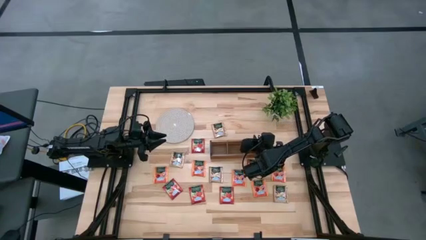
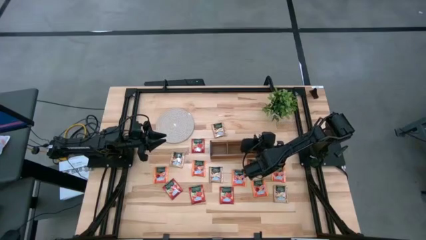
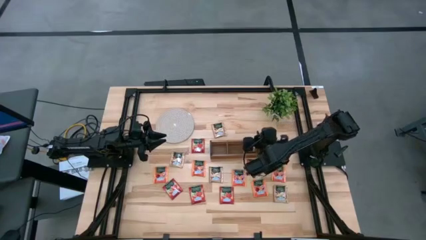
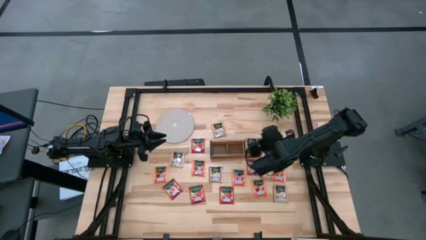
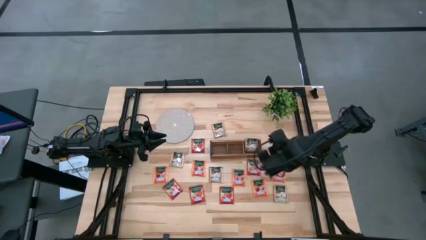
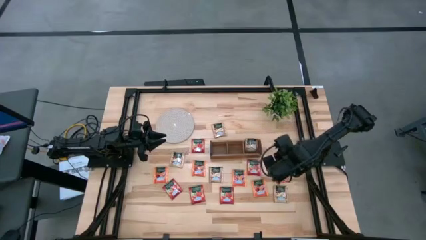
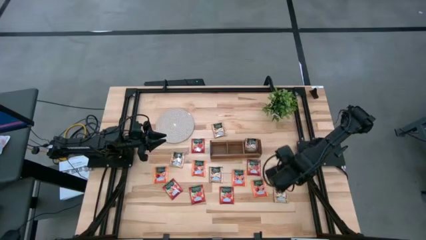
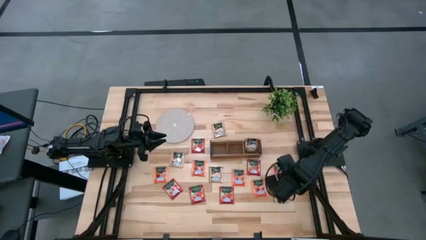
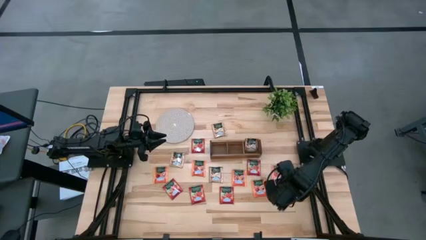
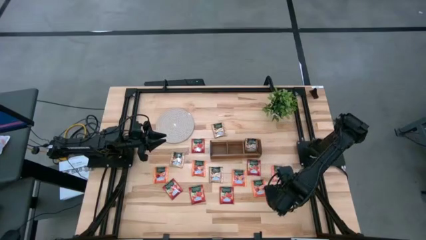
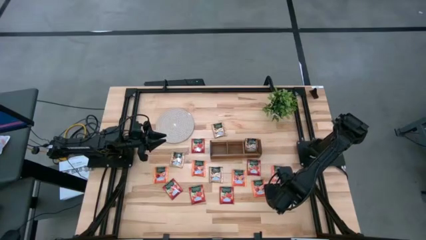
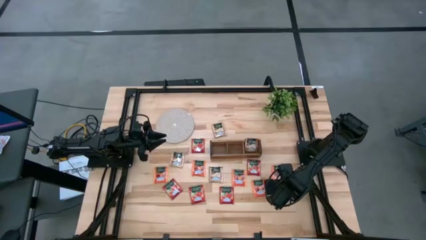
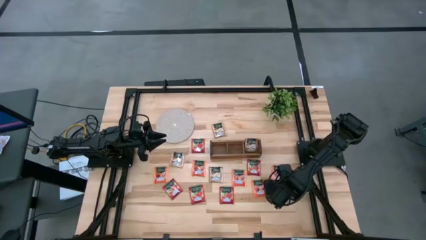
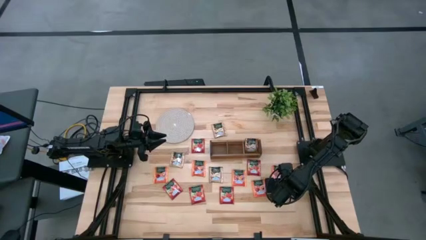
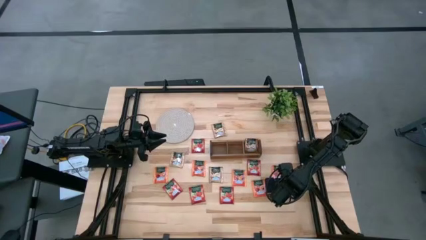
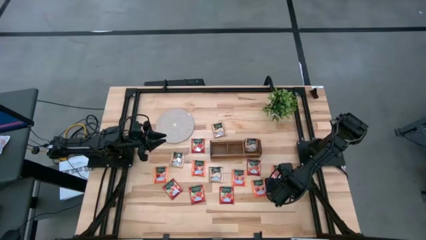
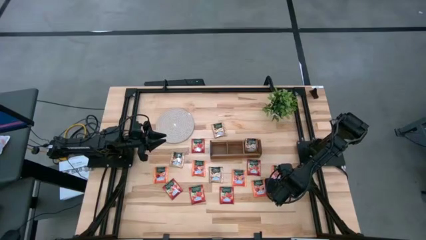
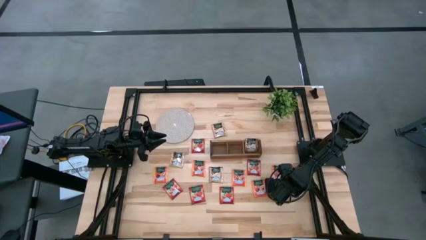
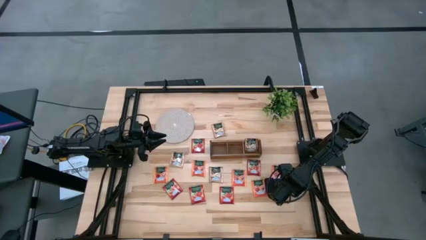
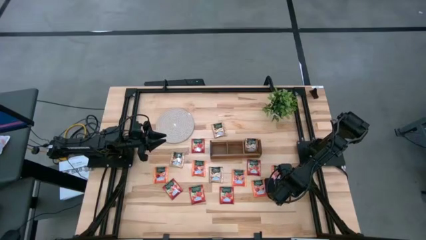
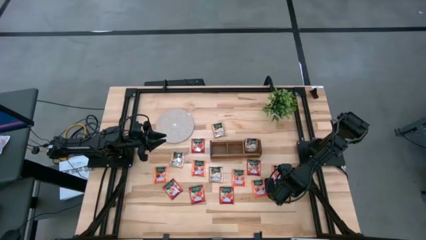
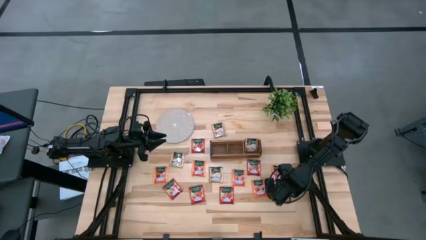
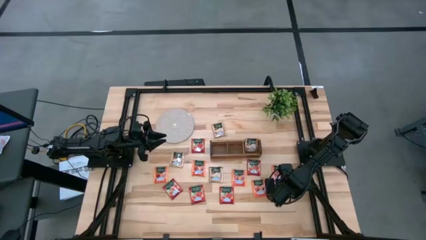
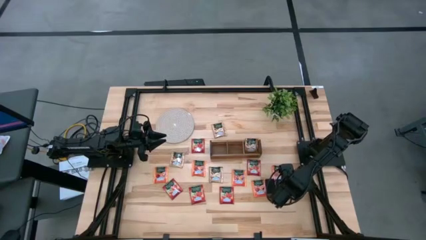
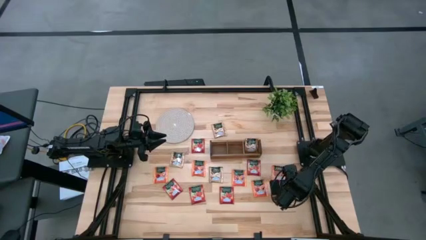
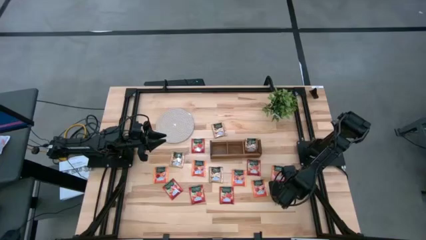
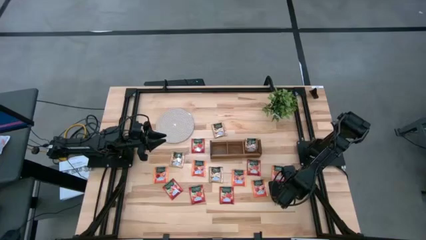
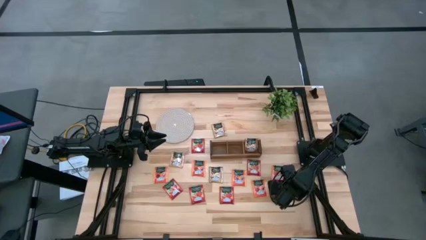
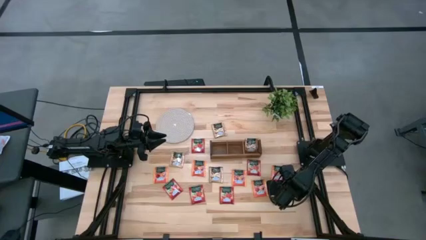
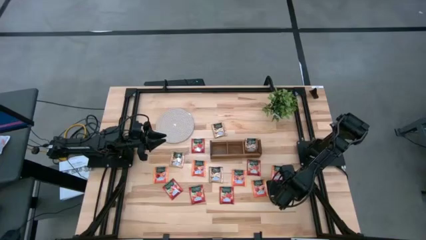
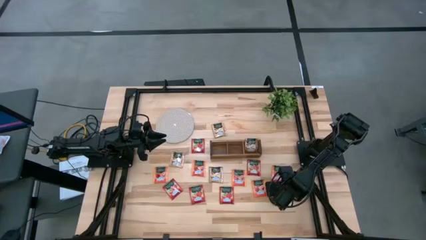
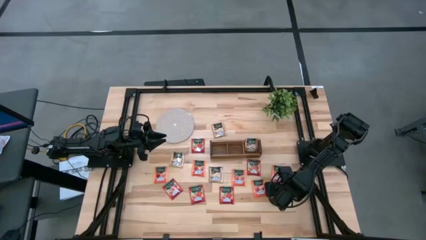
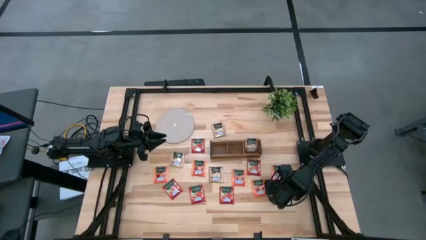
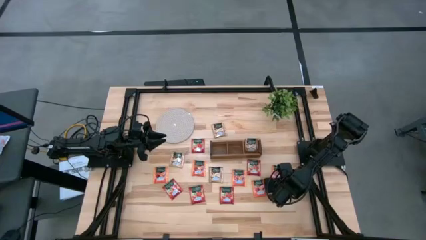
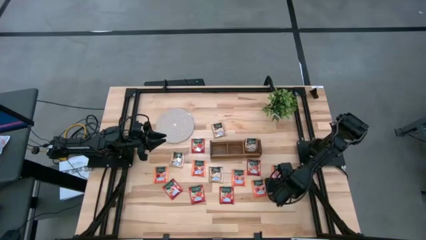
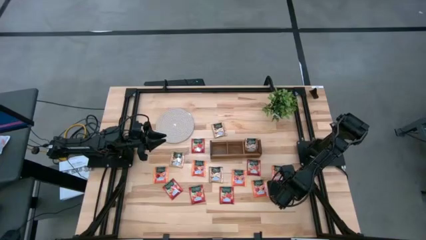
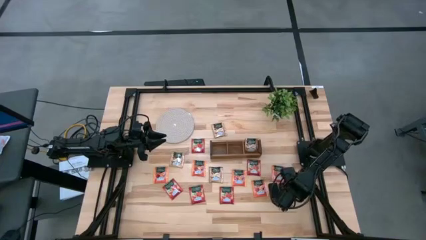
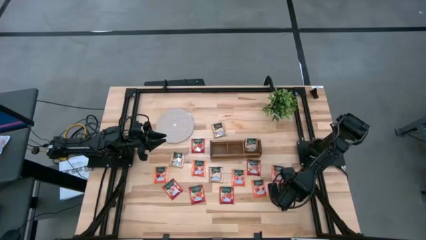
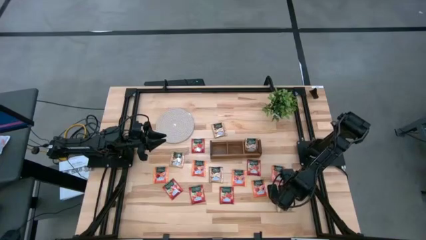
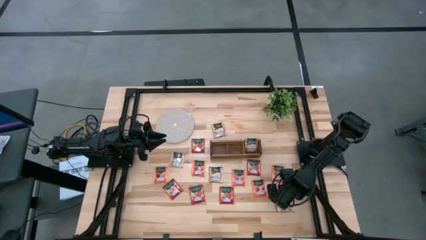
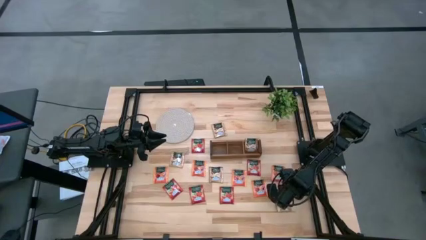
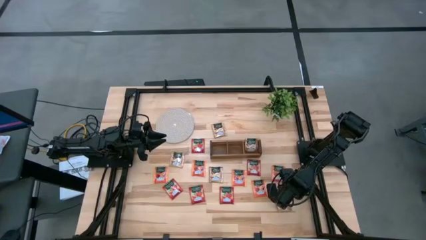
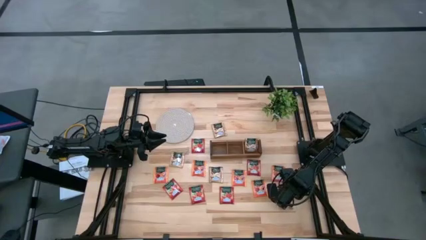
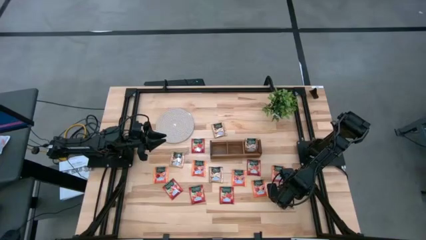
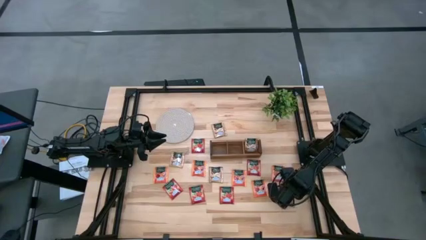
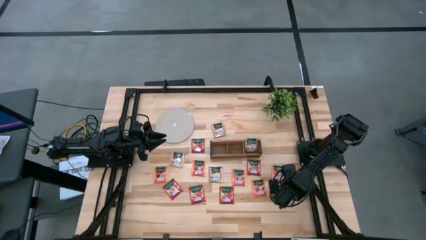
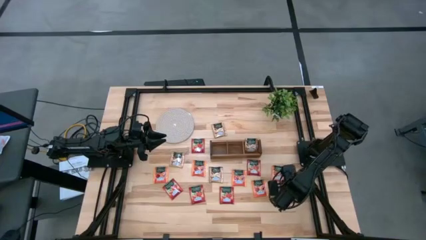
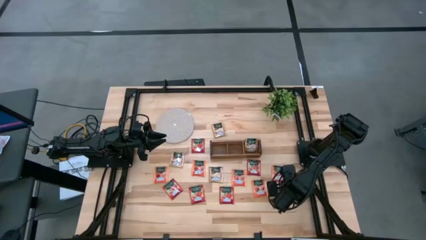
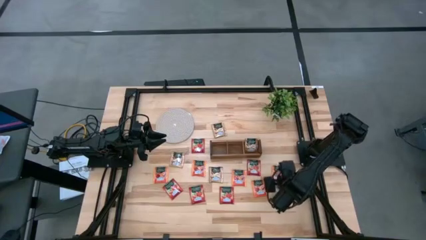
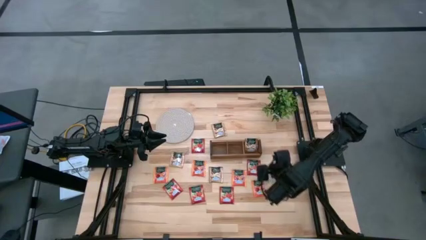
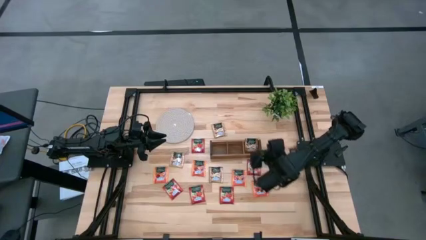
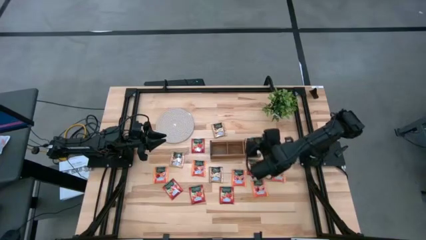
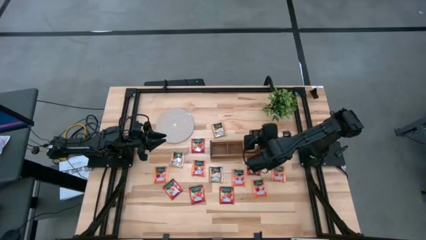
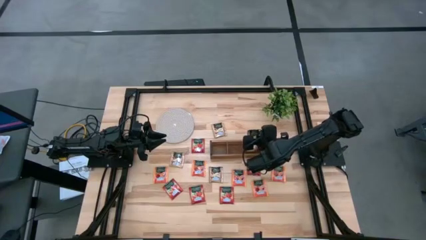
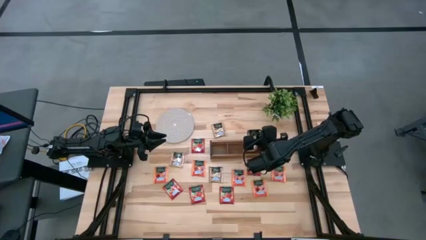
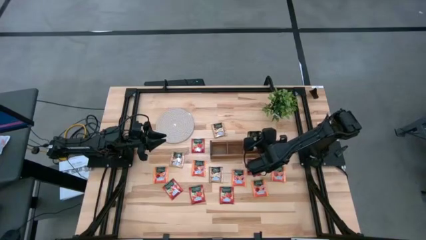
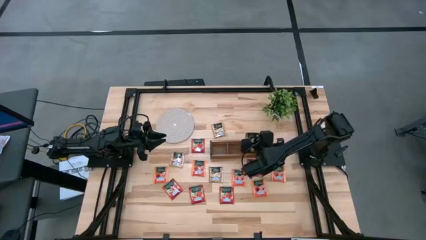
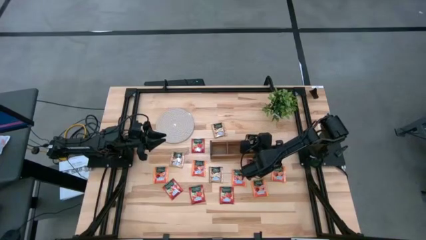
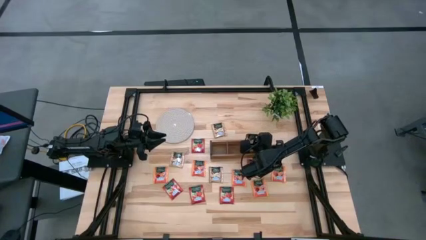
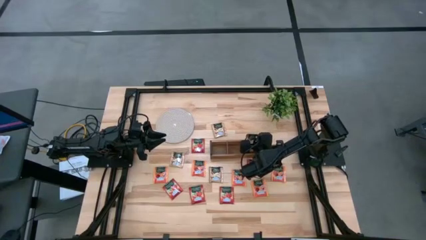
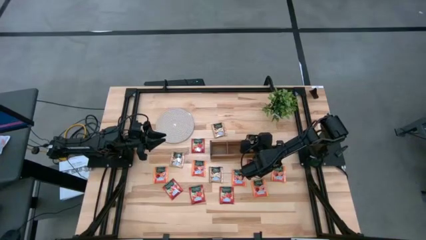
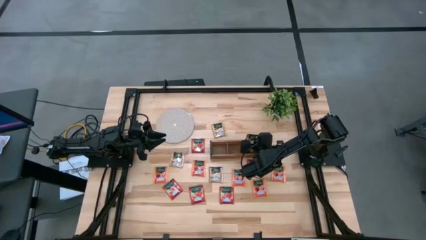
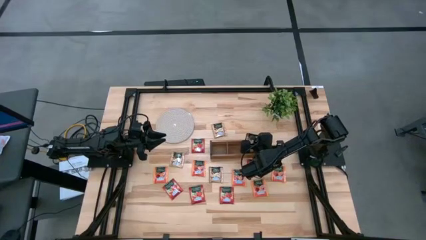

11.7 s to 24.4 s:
Task: Pick & Place Tea
Put the yellow tea bag into the right section of the wooden organizer
